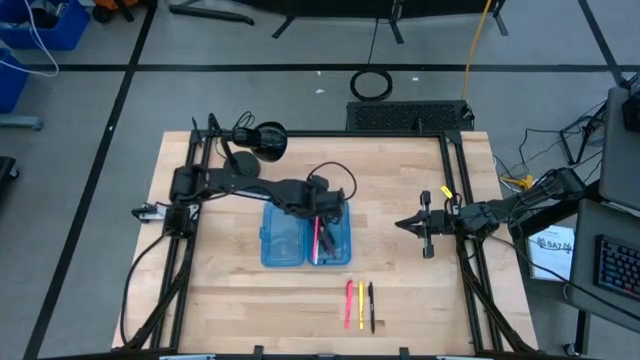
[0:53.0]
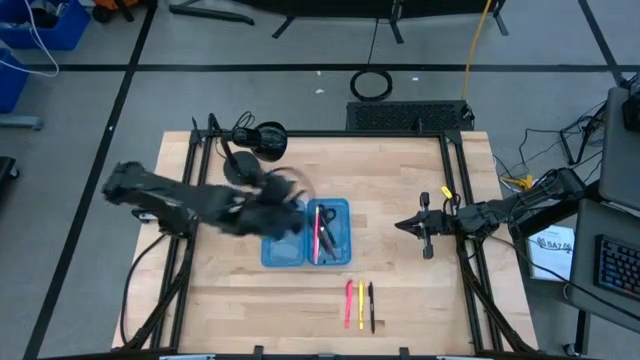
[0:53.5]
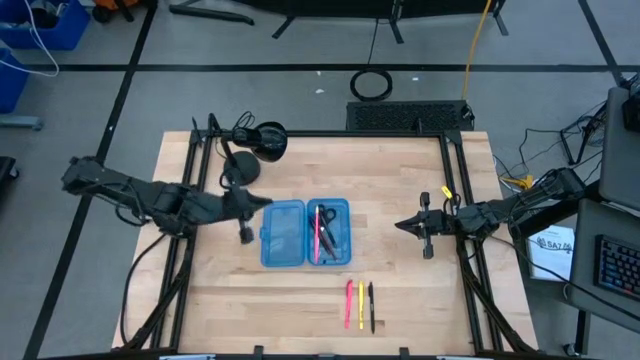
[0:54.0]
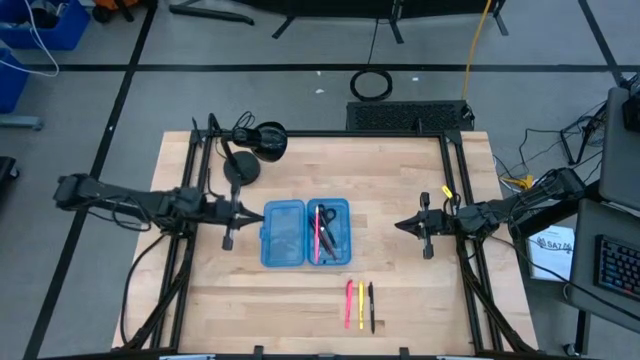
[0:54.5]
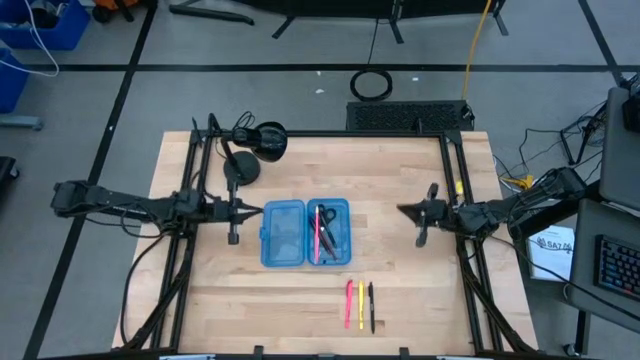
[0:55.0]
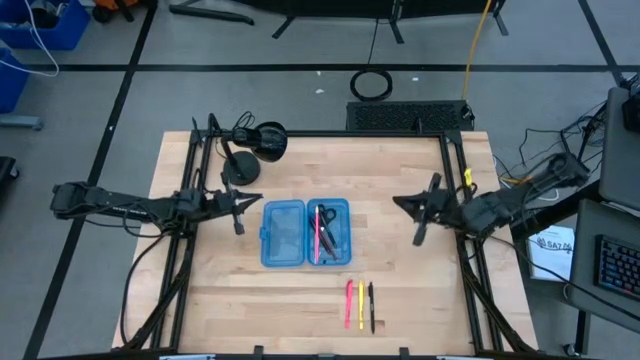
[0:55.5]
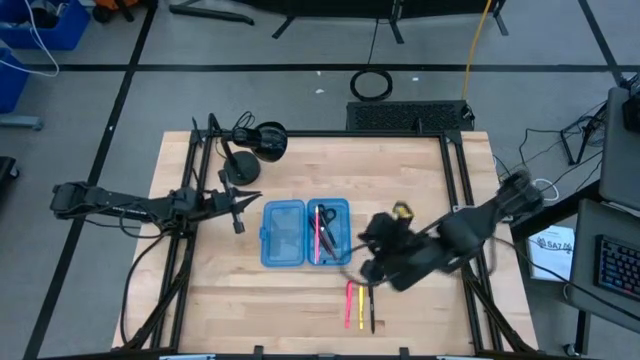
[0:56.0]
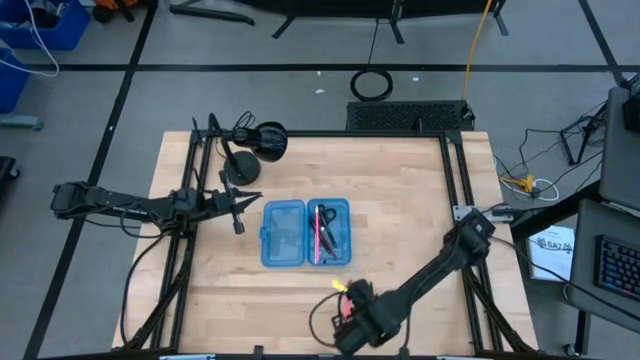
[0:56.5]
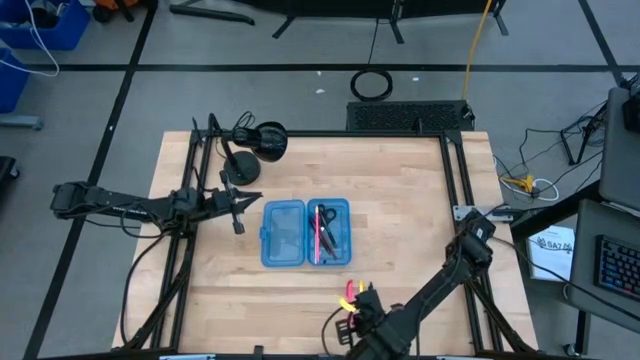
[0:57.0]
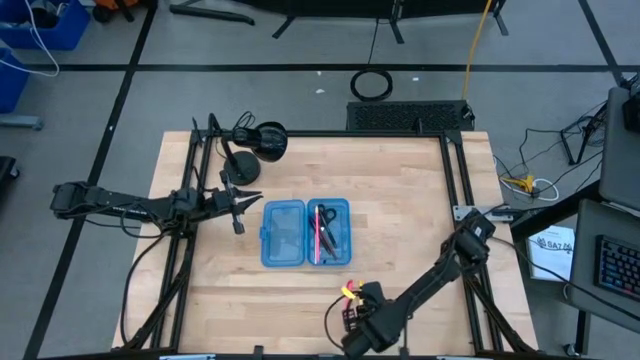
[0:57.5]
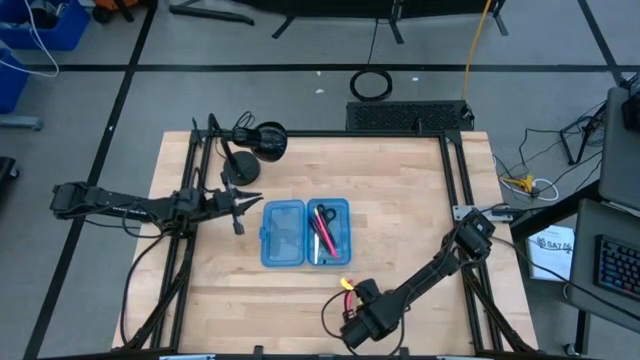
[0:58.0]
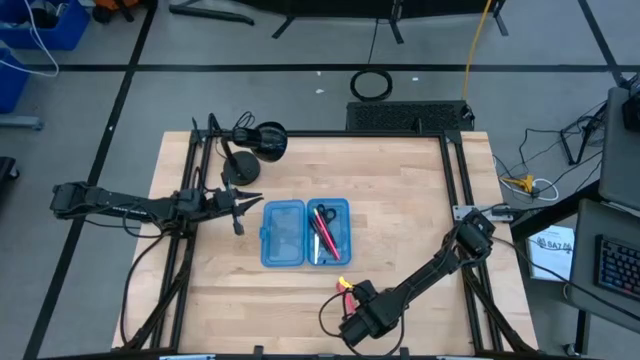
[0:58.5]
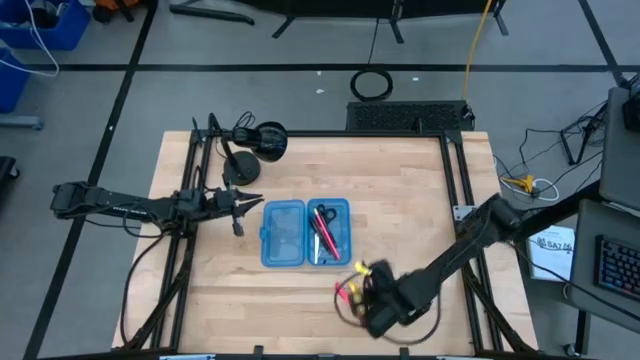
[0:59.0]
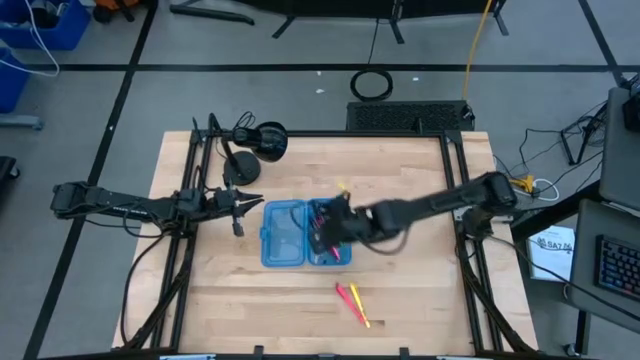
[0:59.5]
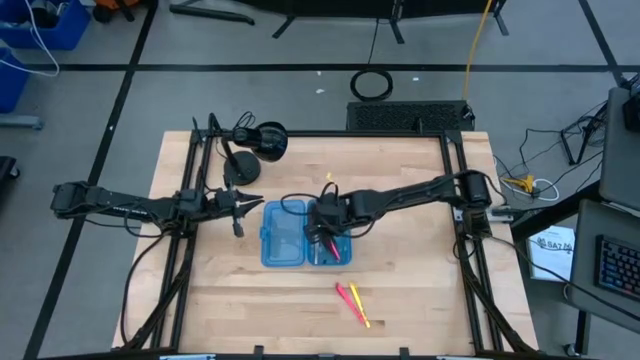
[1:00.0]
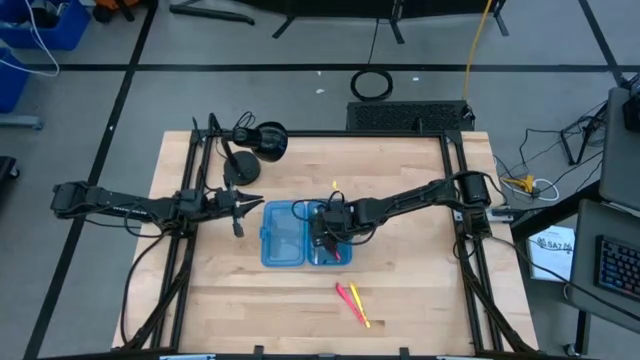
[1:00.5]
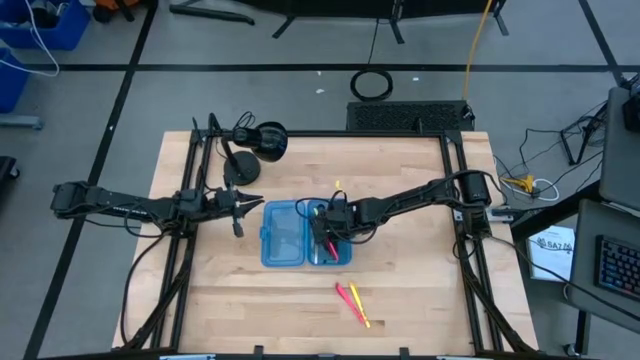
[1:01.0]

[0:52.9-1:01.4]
Task: Pick & place school supplies into a supply box
Put the black pen into the blue box

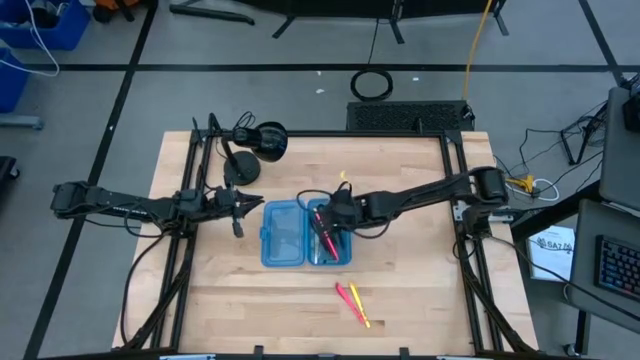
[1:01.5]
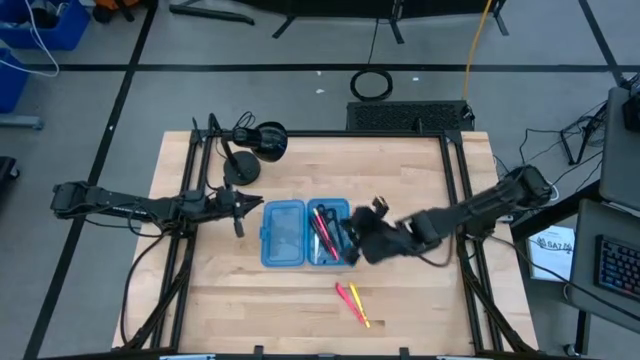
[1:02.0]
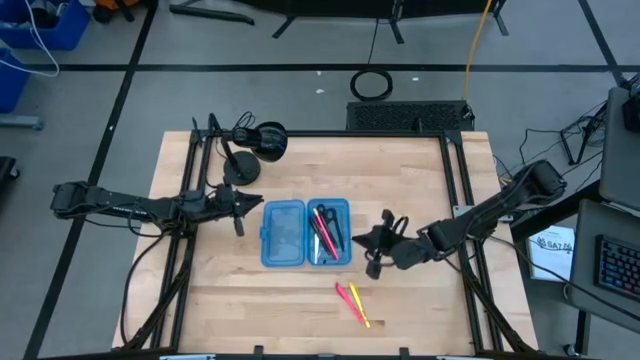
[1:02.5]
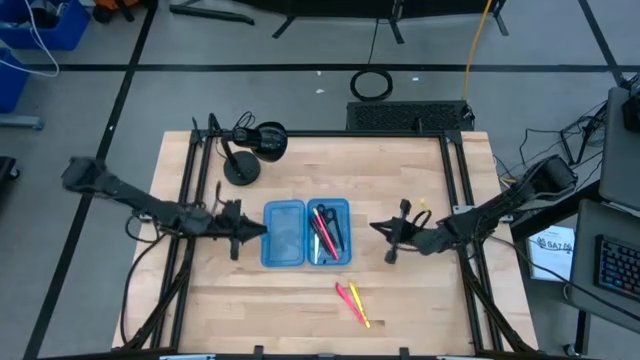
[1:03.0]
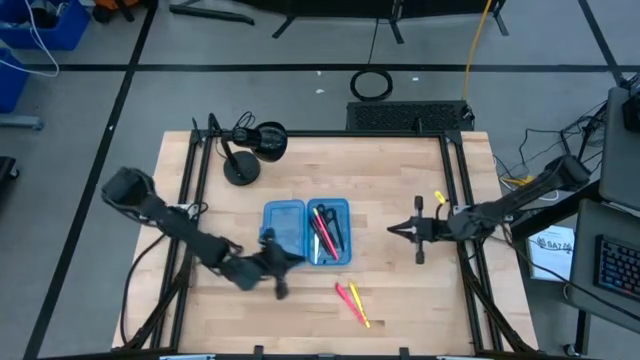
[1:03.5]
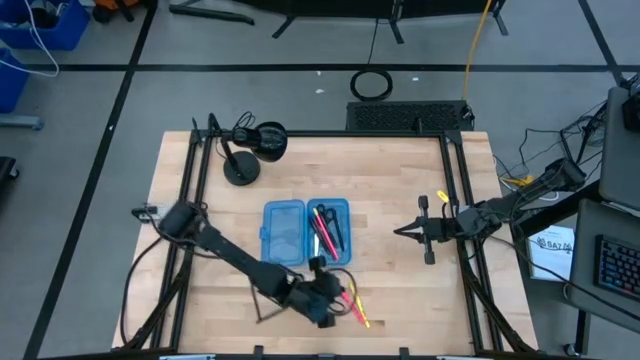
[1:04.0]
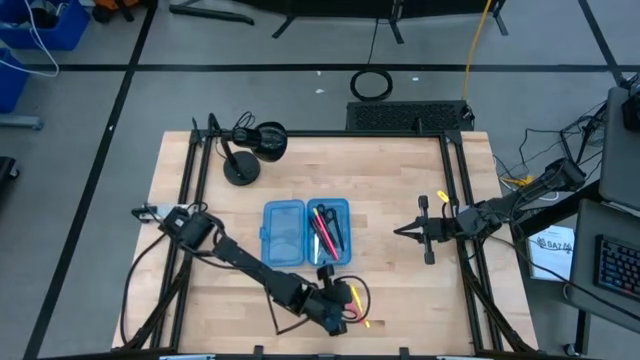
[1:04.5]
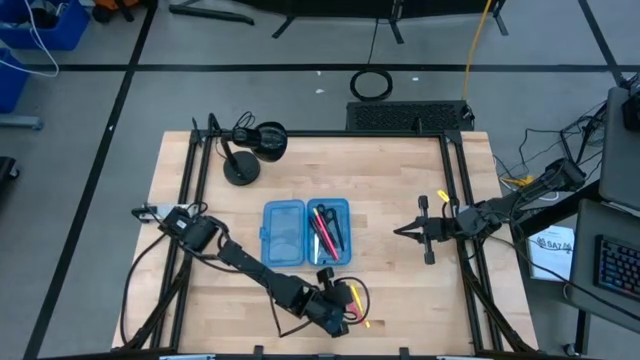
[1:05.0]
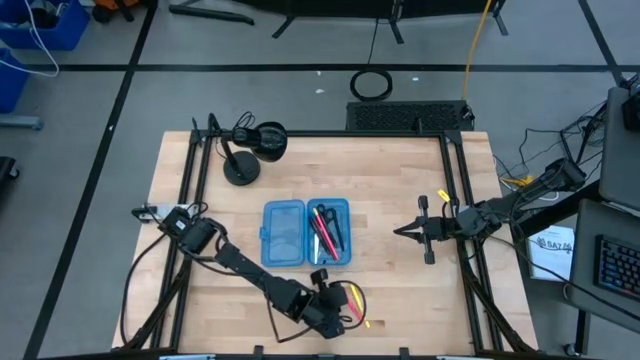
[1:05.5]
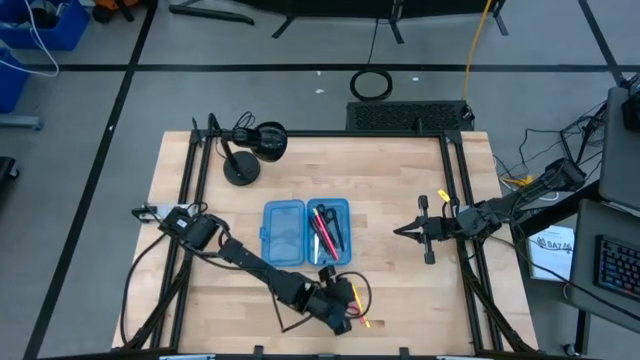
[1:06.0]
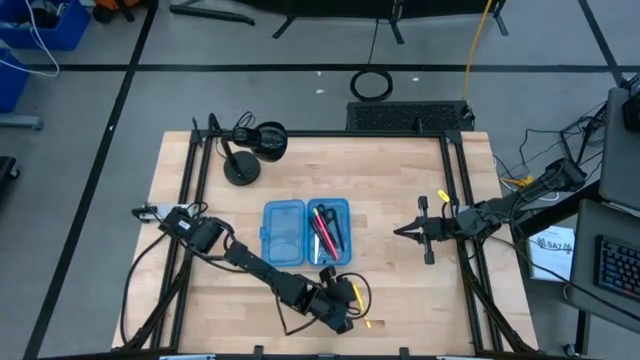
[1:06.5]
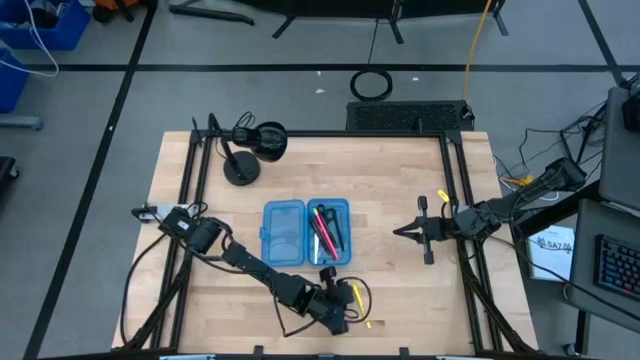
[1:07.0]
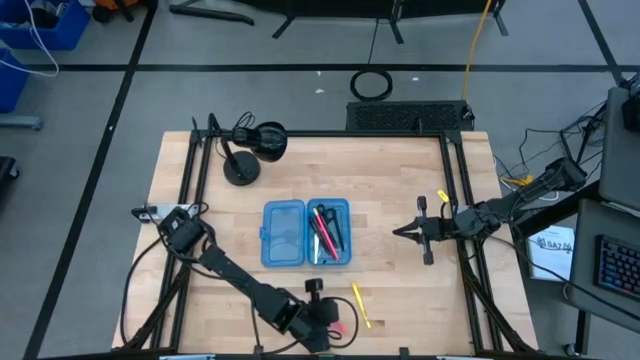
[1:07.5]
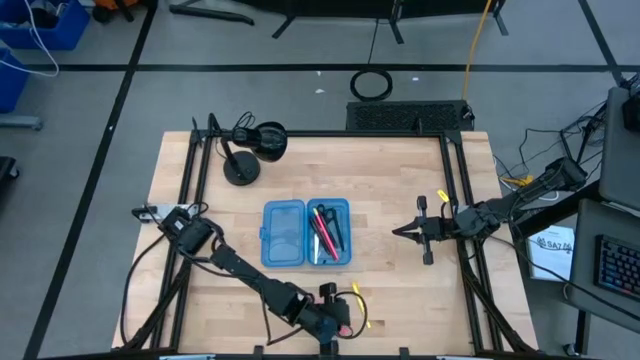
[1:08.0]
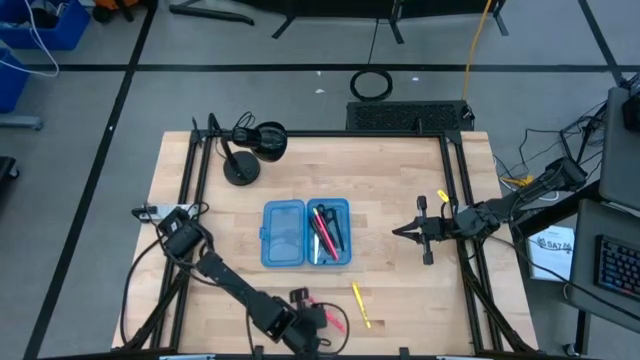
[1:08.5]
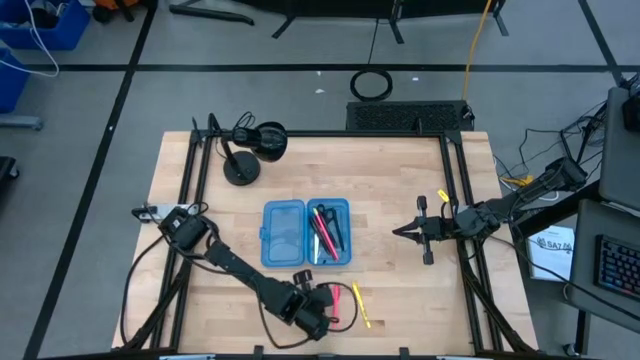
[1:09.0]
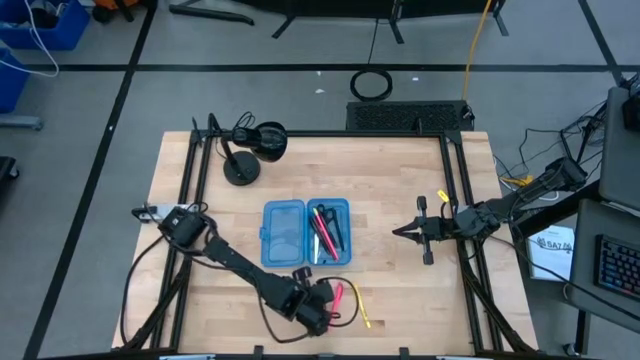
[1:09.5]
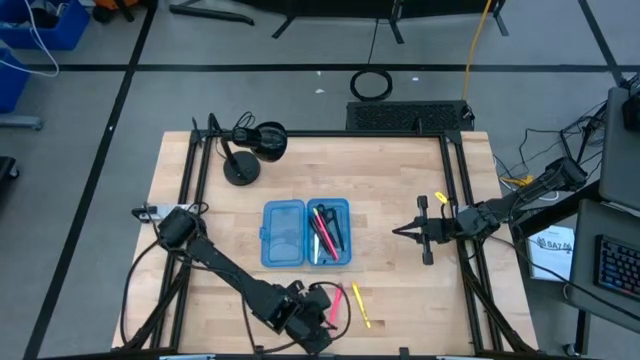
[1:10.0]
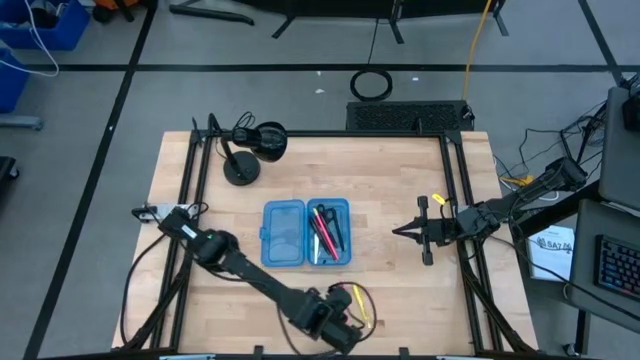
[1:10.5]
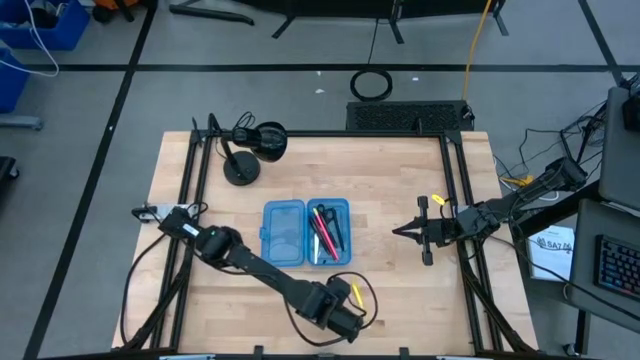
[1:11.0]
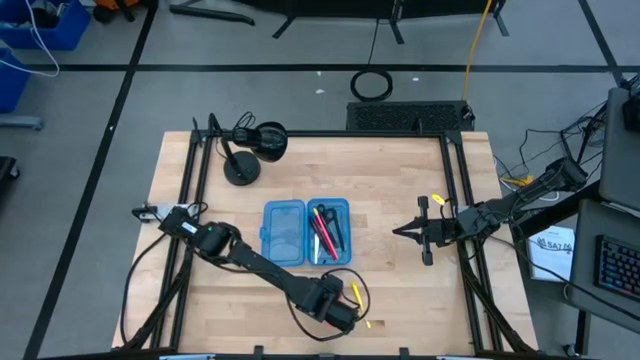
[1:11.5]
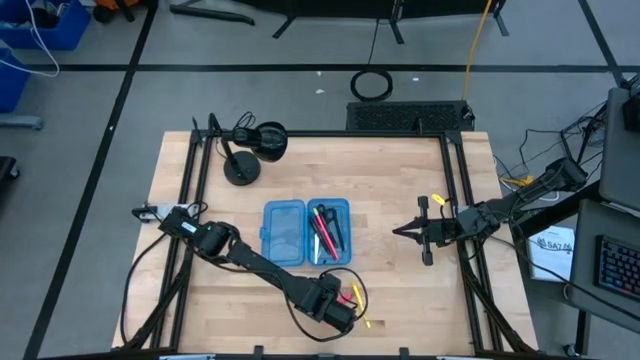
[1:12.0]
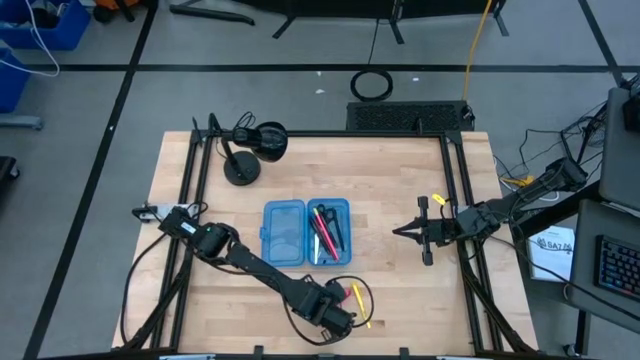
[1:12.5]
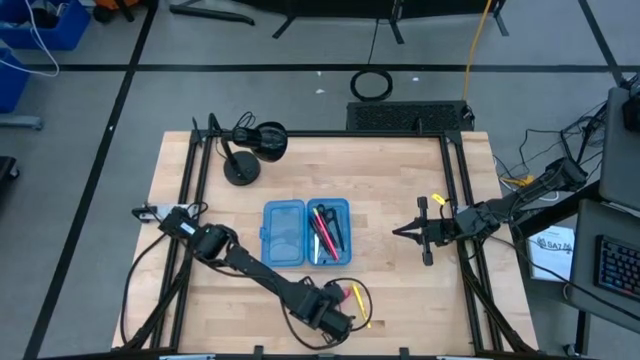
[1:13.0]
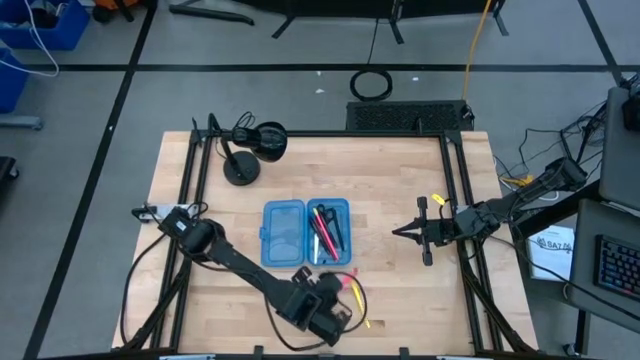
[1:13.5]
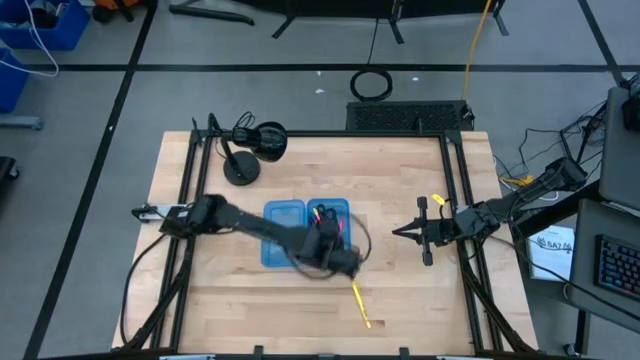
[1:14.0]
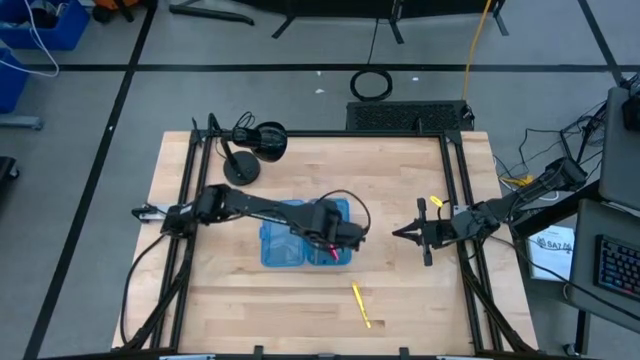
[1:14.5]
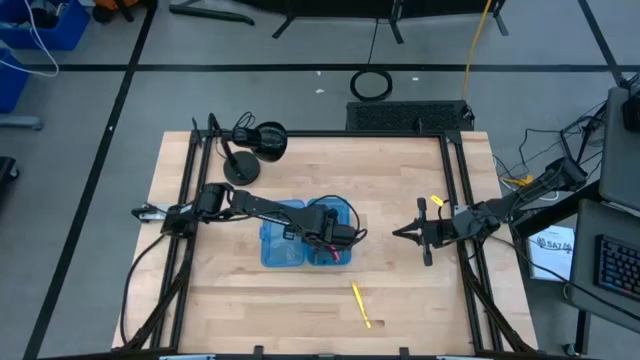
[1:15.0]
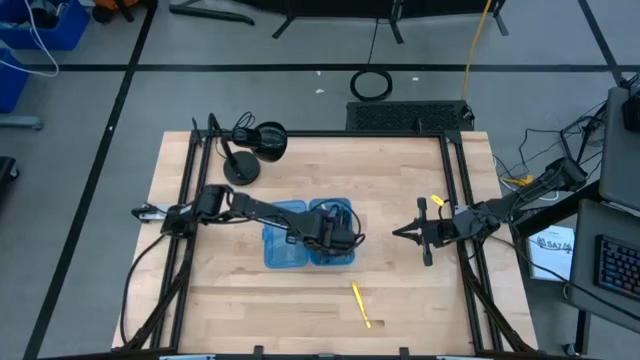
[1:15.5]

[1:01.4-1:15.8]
Put the pink pen into the blue box
